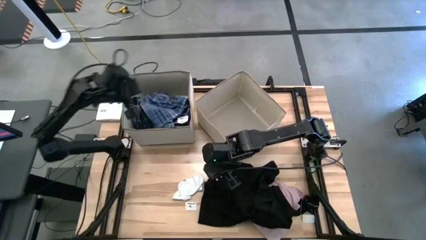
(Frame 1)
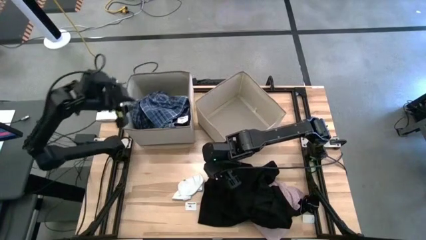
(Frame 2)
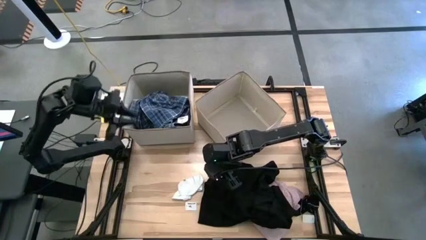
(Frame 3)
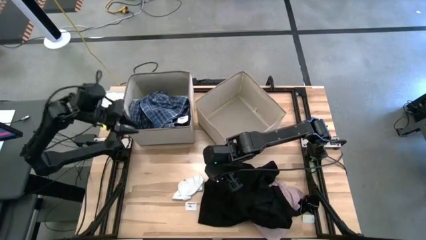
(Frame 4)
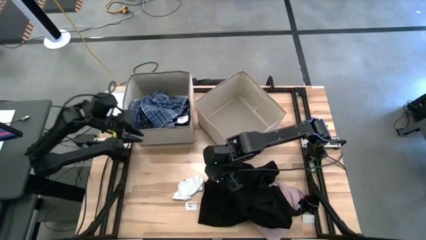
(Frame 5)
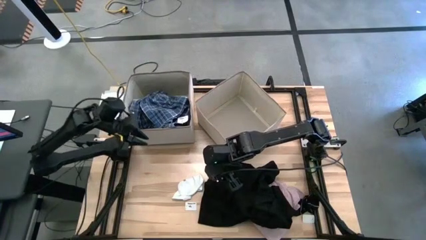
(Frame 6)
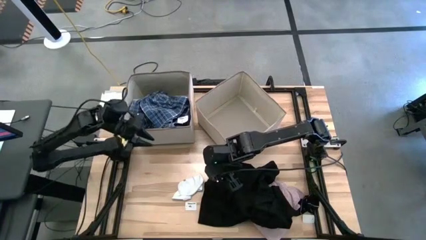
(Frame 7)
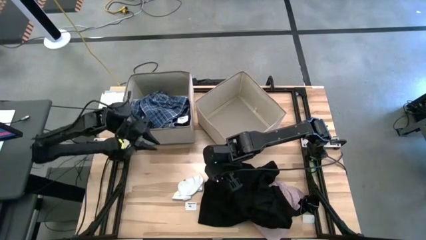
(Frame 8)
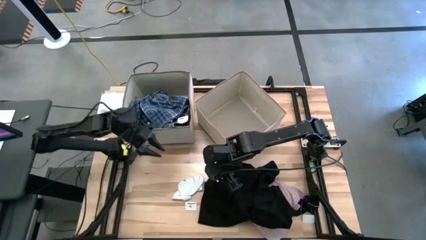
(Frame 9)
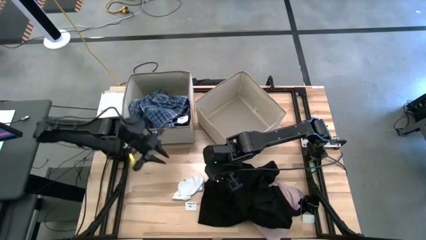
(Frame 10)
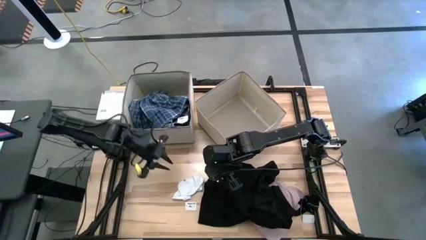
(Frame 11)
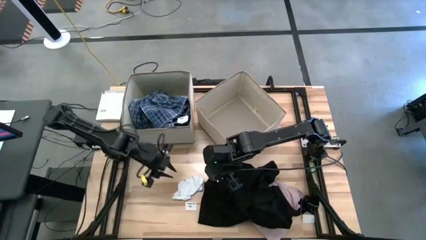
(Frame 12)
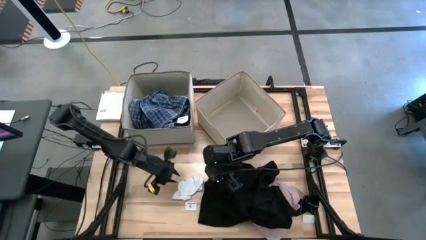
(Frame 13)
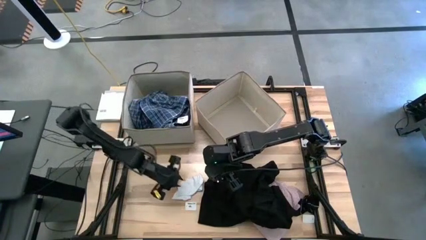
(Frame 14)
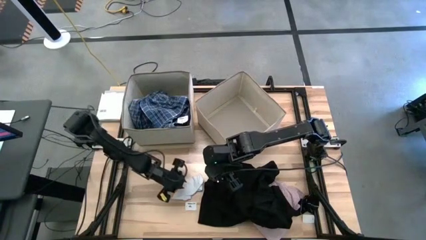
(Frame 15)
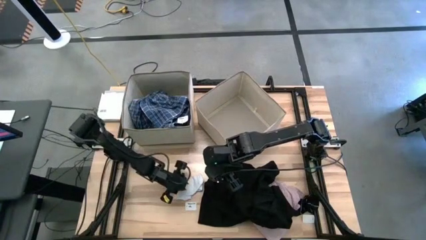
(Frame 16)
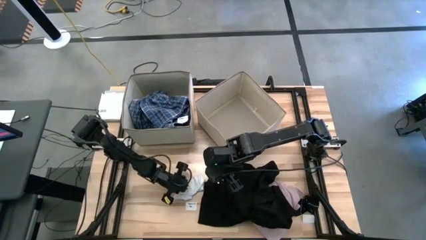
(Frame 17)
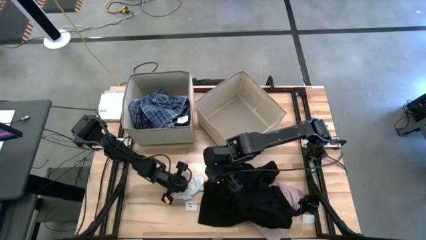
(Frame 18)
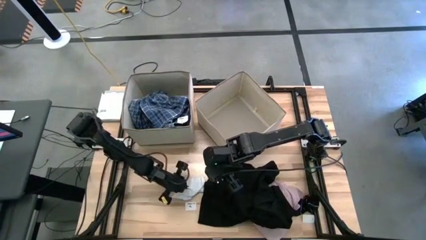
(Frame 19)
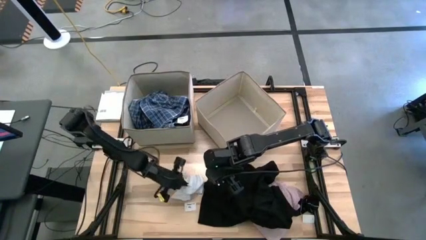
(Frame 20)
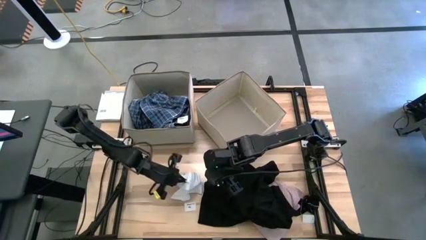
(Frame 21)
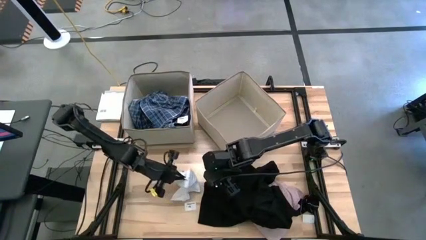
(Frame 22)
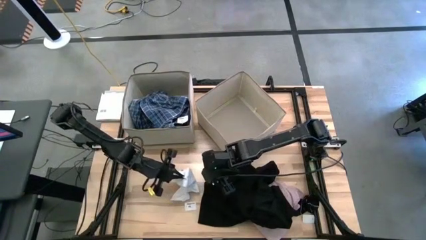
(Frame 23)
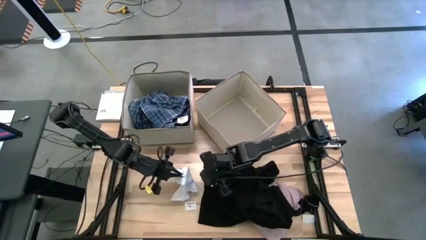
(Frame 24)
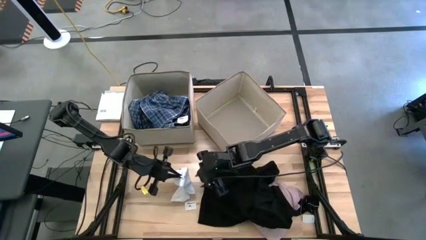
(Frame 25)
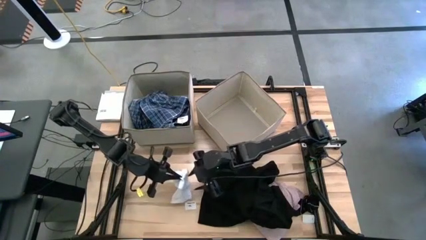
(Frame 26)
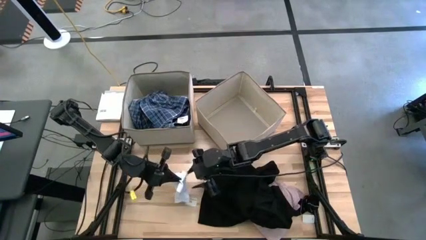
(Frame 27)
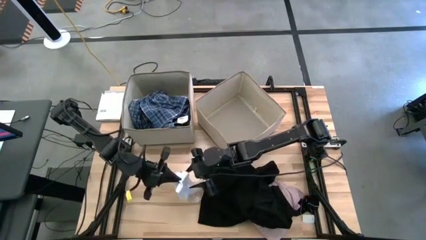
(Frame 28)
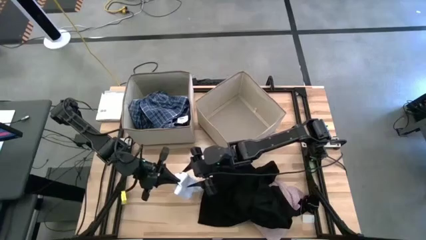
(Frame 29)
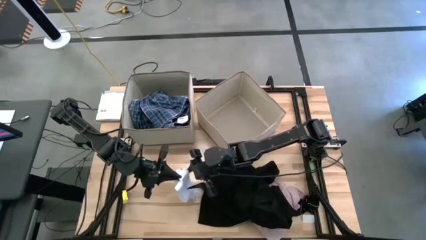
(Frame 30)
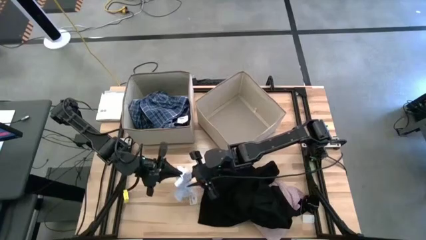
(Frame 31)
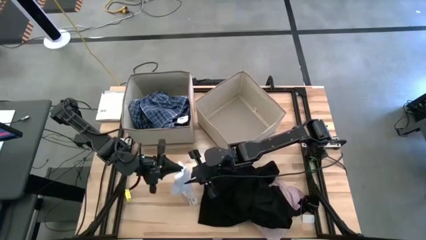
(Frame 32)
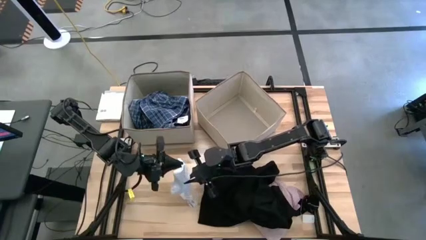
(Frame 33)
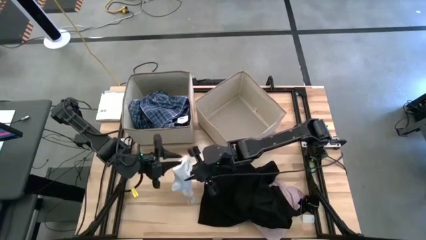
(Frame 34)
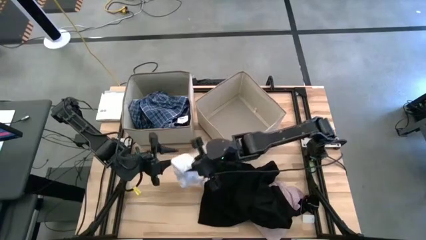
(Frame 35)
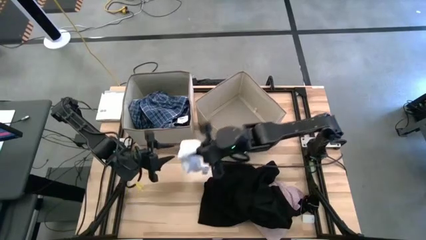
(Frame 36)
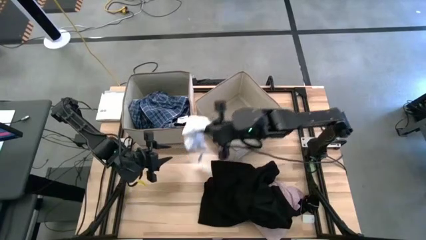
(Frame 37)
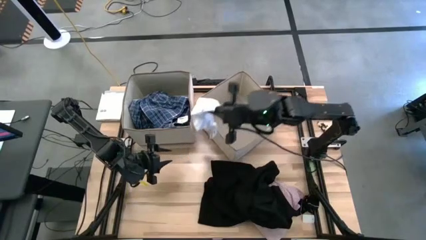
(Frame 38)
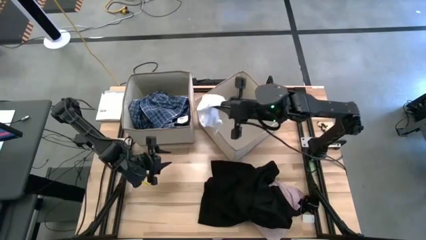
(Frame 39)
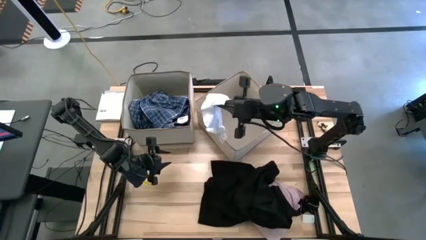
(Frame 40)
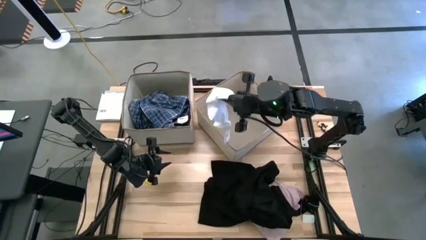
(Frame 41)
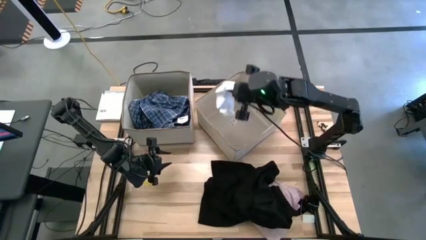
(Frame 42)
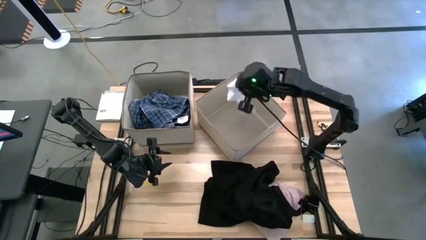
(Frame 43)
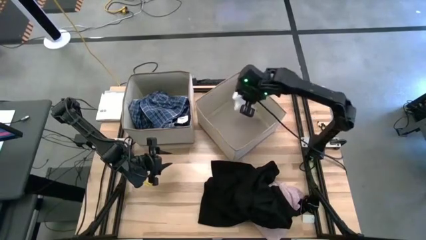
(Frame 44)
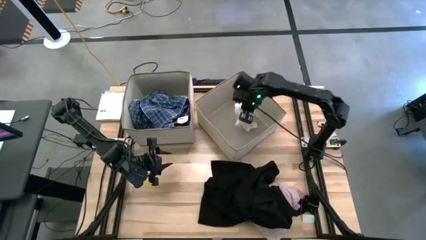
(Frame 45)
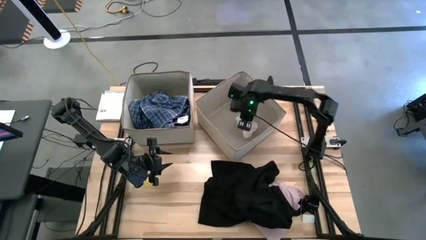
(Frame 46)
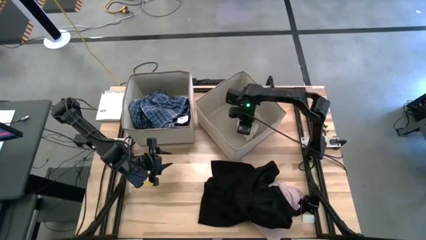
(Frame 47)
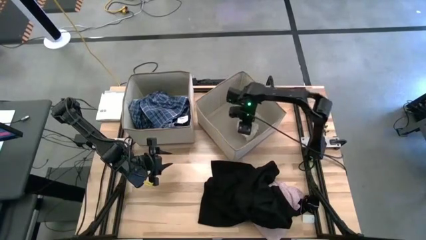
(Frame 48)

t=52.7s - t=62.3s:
Task: Sort clothes
Put the white sock into the right laundry organizer

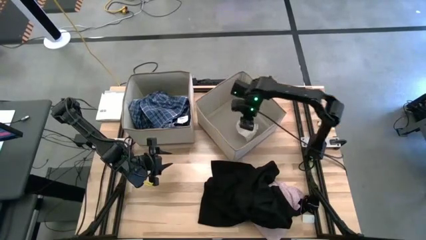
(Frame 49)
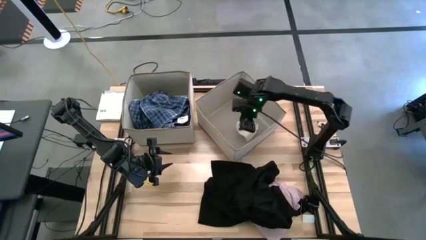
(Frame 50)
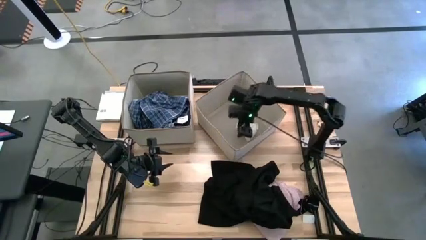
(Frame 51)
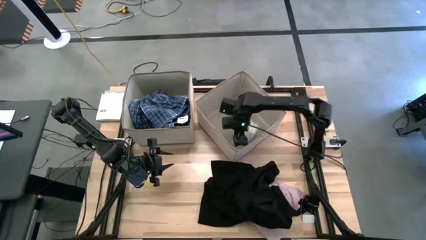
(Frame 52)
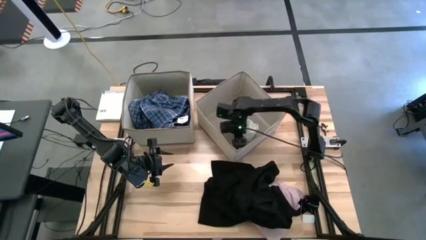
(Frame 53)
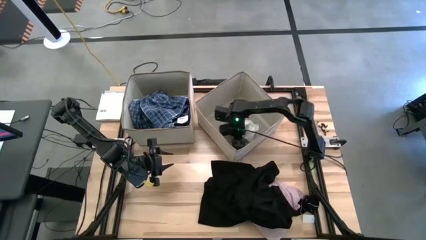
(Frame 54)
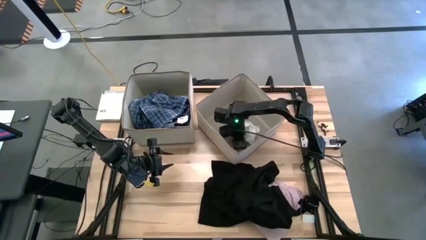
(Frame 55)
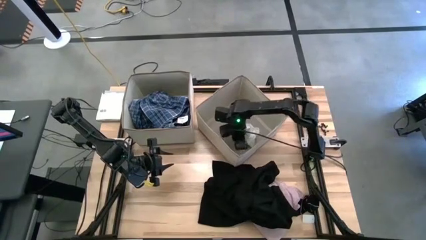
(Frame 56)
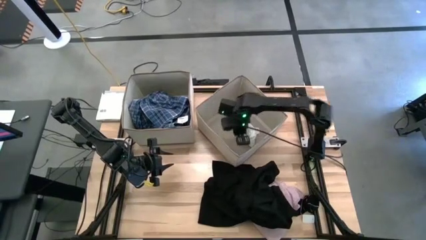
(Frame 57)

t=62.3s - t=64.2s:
Adjust the white sock in the laundry organizer

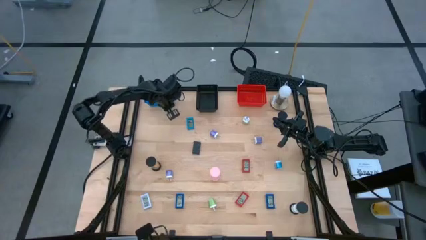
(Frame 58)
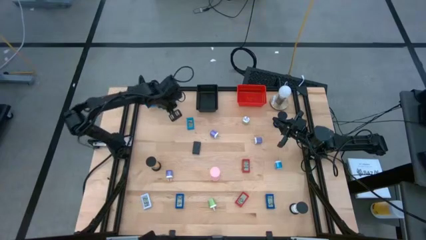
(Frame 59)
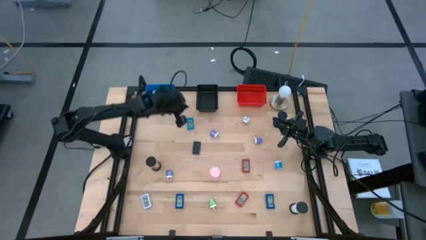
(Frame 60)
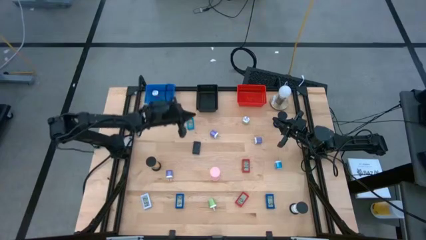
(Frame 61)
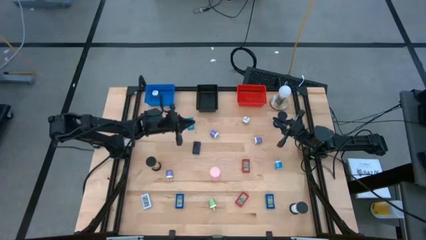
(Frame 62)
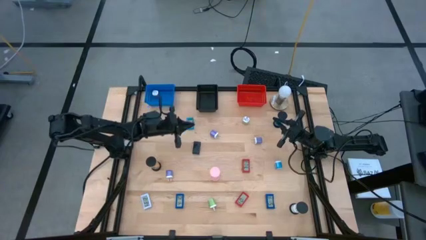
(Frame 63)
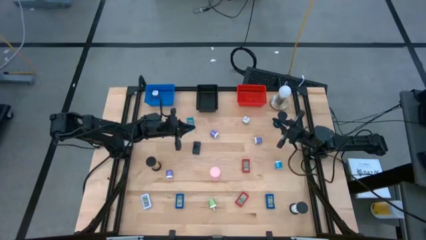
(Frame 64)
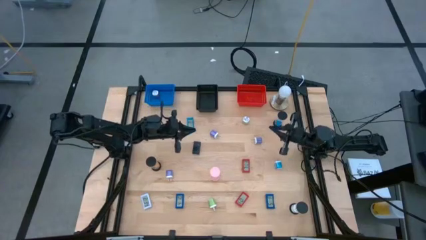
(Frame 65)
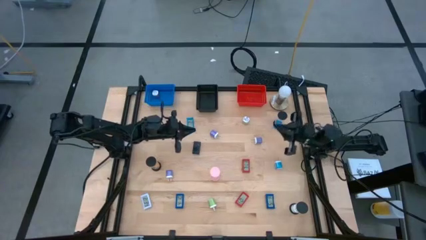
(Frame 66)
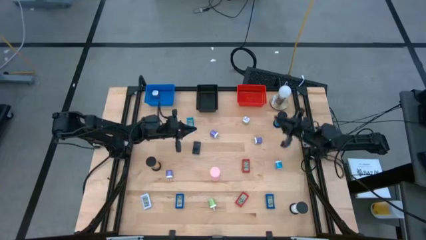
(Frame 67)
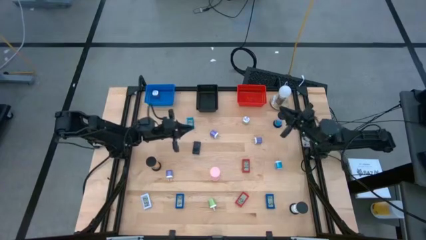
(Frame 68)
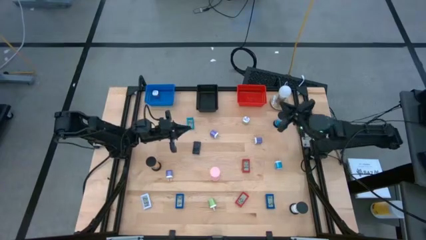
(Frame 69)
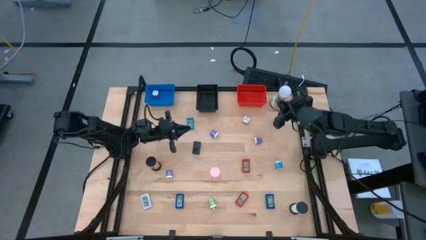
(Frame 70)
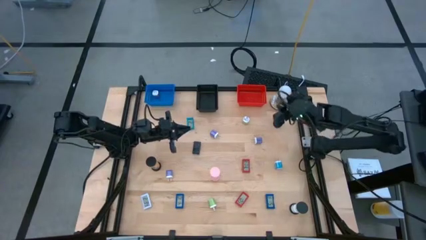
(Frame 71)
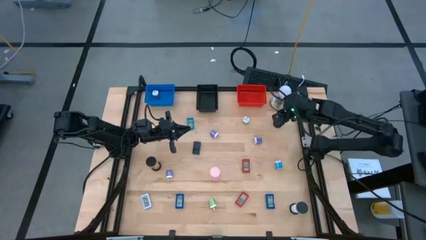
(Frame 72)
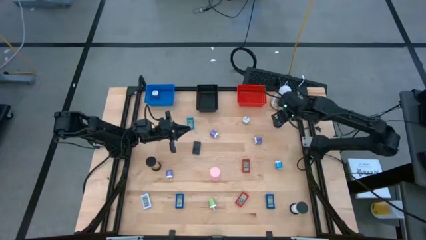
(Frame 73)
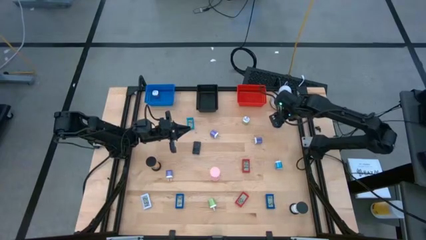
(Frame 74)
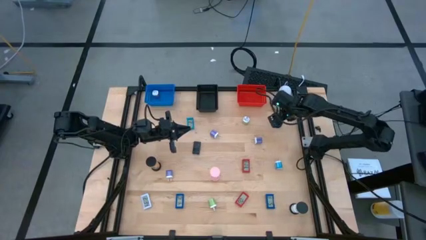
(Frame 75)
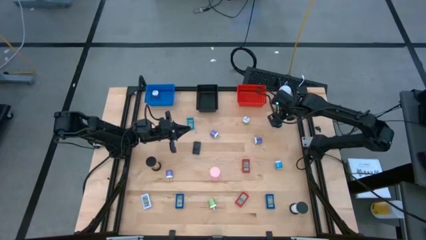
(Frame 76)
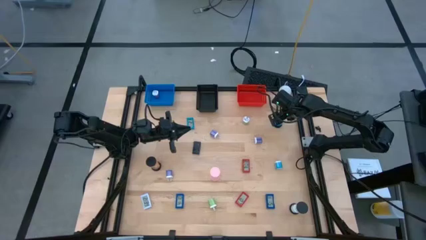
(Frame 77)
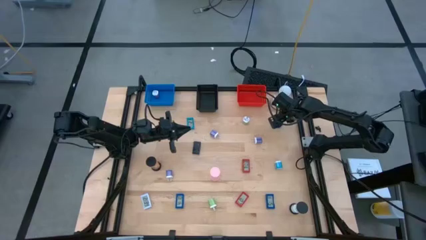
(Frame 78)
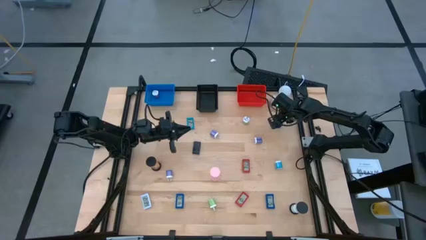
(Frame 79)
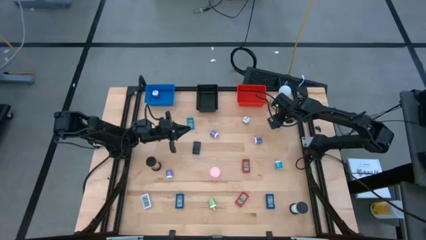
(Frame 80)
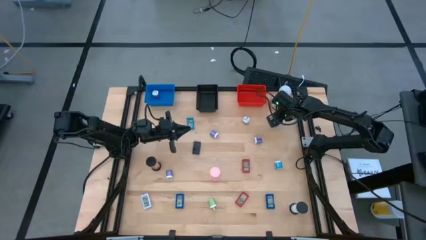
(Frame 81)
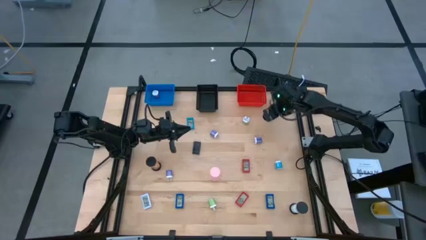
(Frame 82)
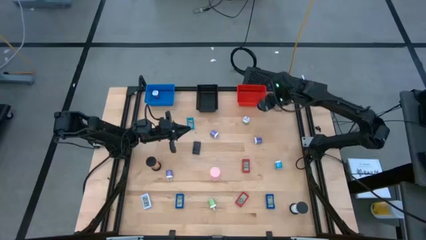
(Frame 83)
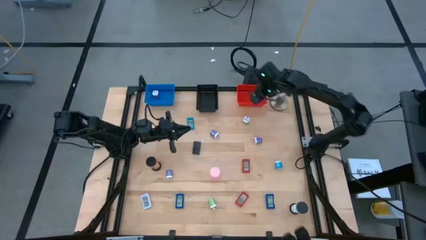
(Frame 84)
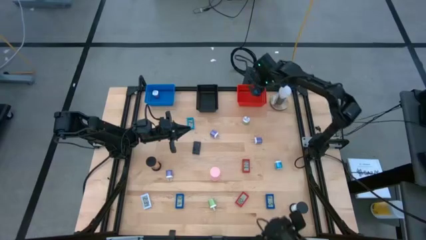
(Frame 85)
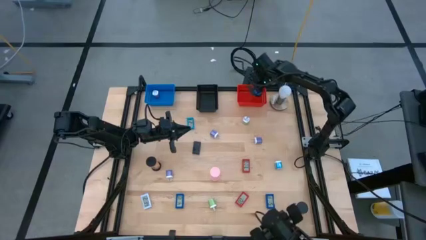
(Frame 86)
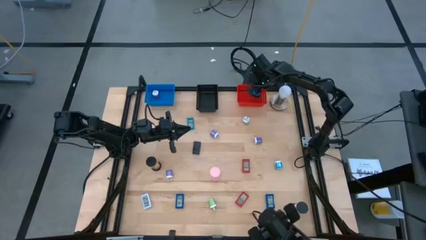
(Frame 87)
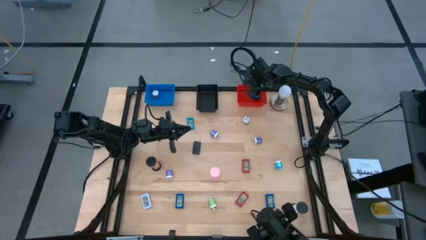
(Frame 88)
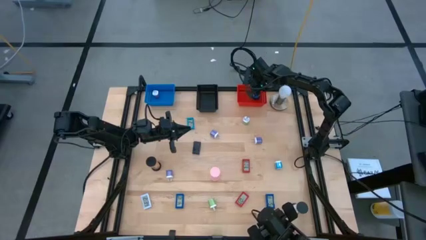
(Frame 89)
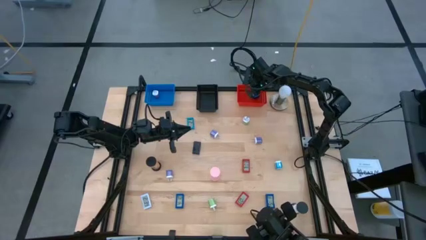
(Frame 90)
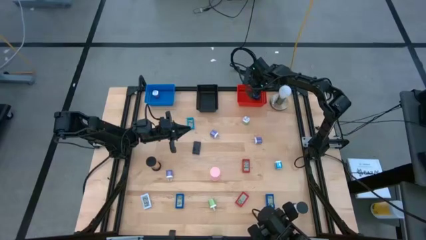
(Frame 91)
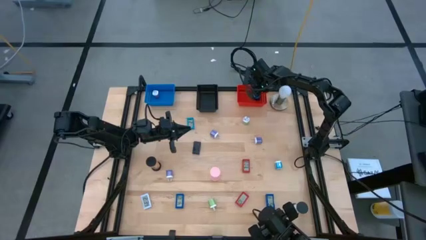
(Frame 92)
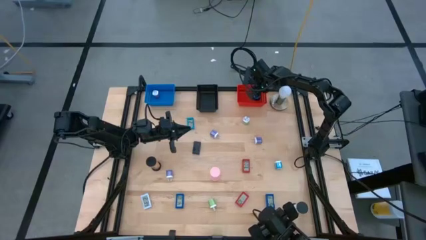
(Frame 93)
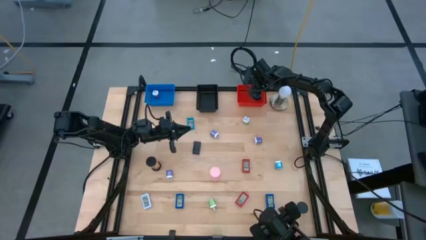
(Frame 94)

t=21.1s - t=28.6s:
Task: Pick & Place Office items
Put the top right black hourglass into the red bin
